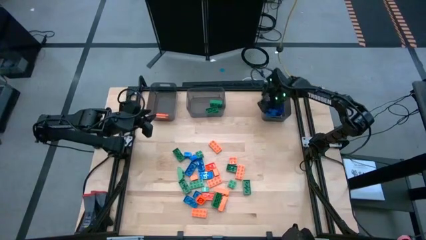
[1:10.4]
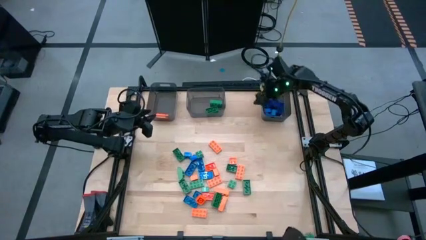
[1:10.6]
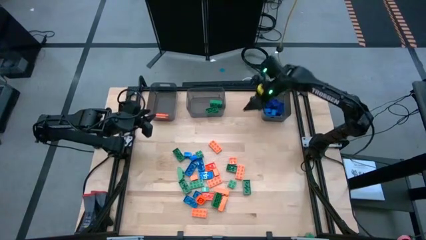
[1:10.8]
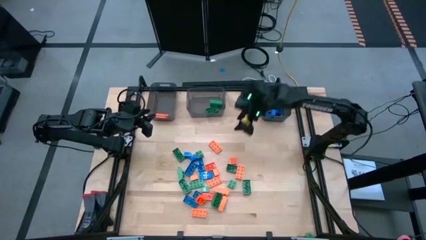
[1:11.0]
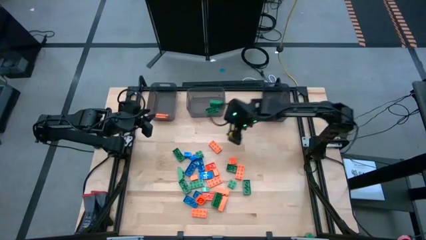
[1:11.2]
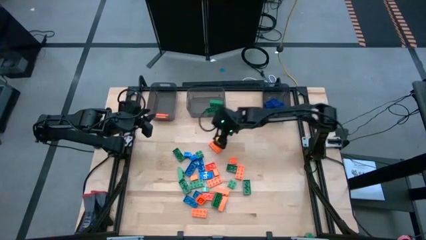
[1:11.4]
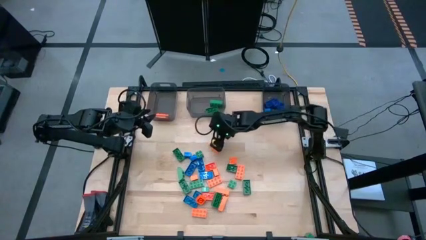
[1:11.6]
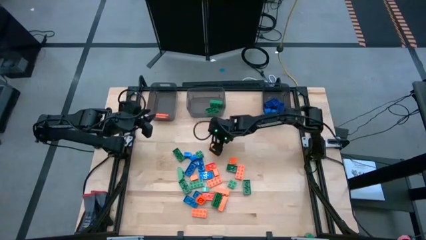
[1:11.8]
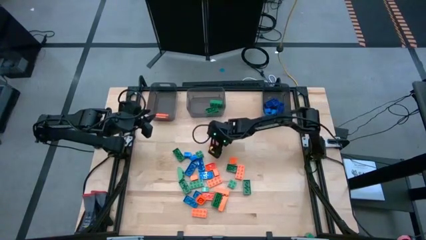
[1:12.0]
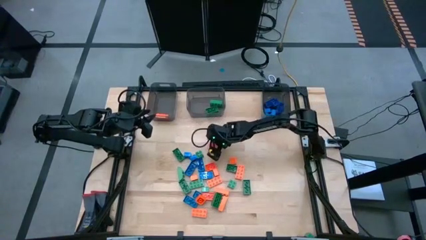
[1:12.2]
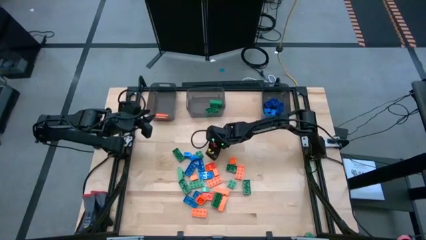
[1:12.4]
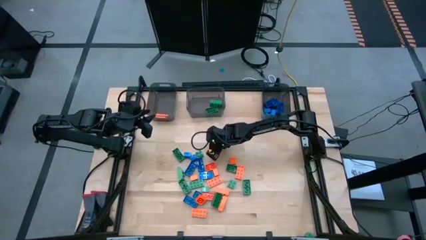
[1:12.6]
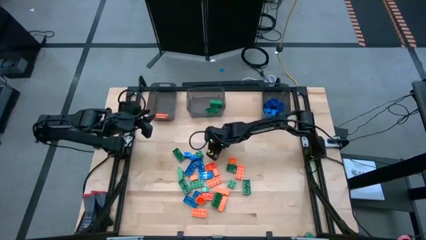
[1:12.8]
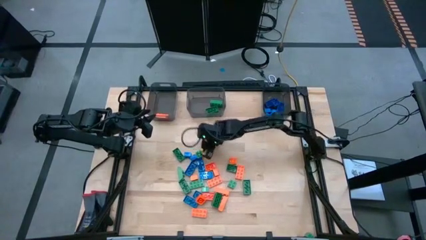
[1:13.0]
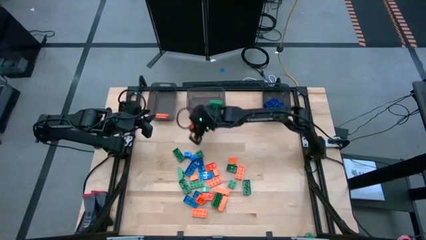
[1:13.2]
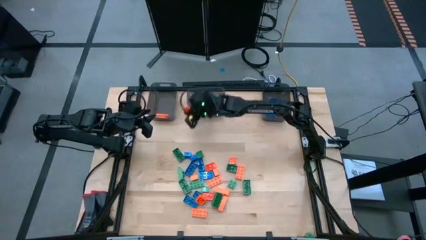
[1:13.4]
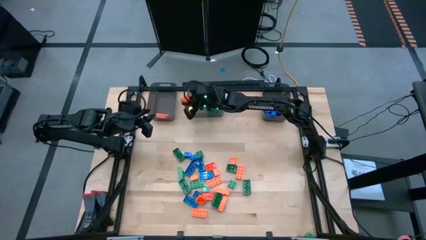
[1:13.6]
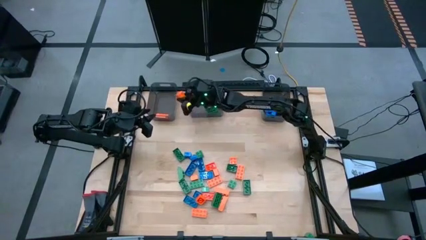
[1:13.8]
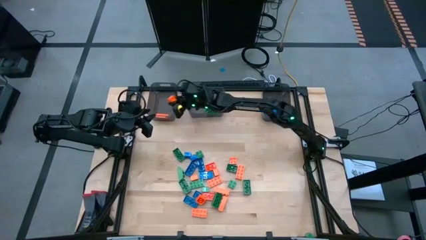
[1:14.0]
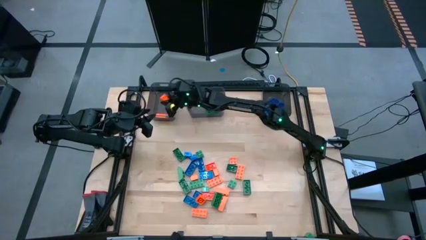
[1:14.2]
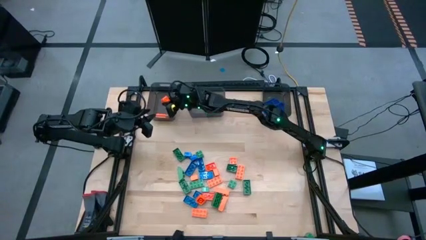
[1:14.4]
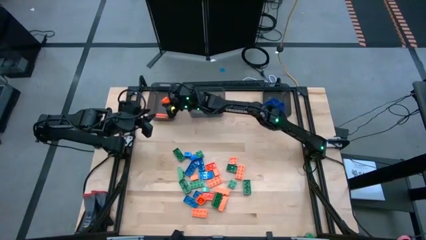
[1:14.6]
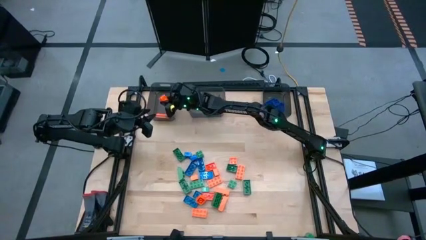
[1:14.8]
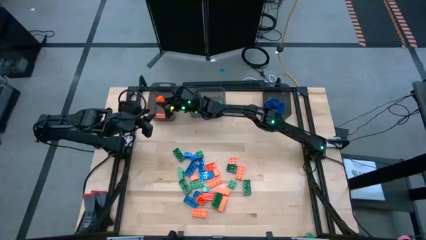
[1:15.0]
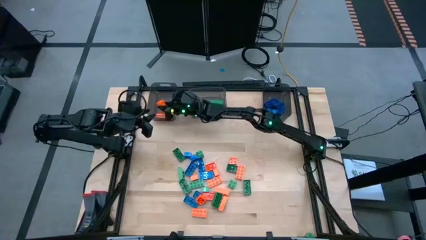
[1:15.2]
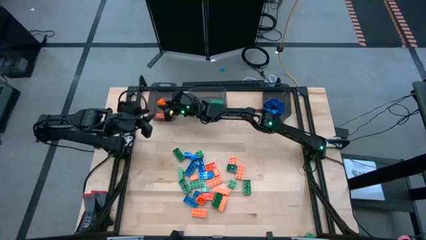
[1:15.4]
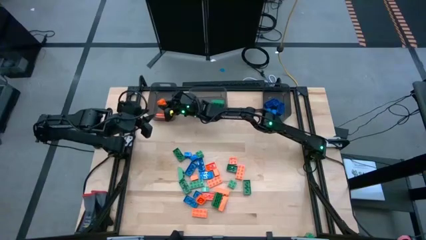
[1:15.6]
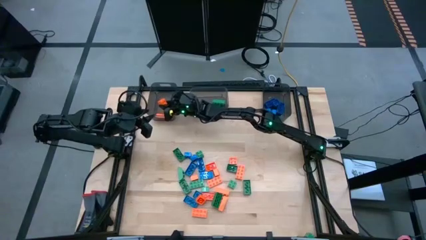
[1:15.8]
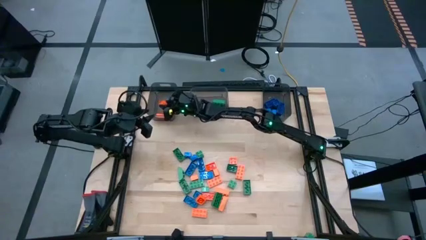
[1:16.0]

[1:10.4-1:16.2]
Task: Sort blocks
Put the orange game piece into the left black bin

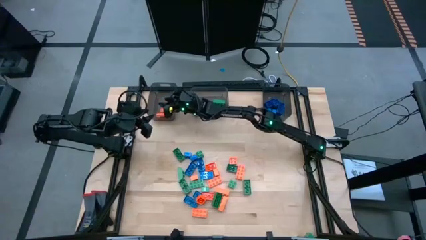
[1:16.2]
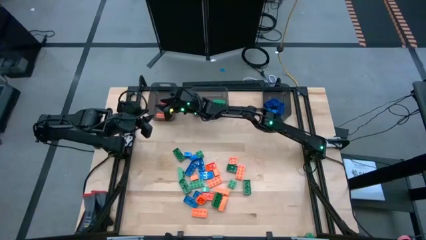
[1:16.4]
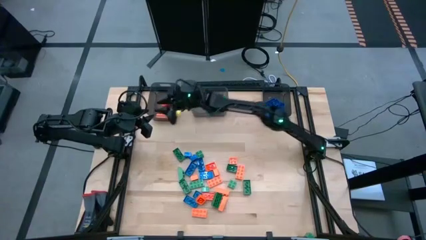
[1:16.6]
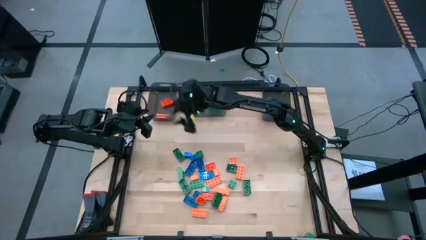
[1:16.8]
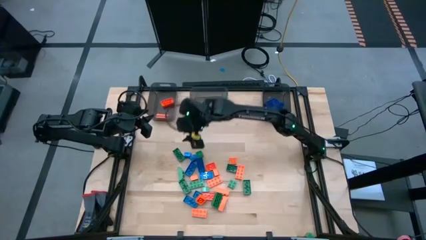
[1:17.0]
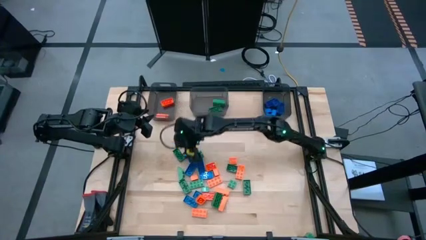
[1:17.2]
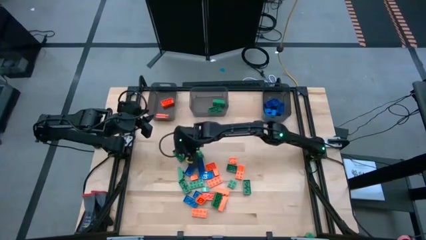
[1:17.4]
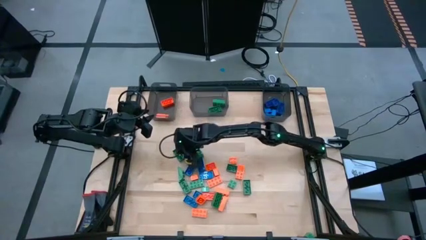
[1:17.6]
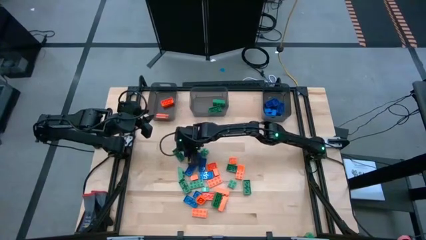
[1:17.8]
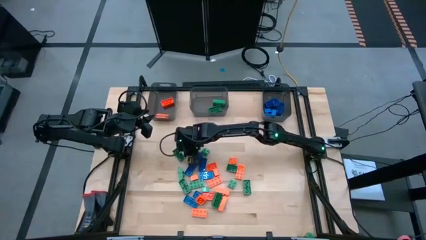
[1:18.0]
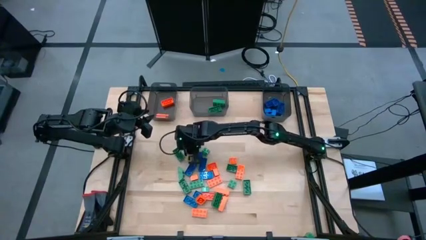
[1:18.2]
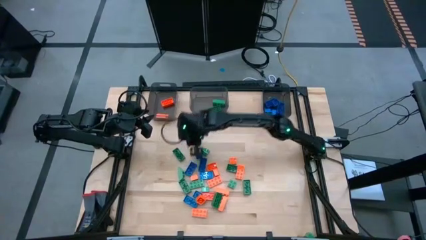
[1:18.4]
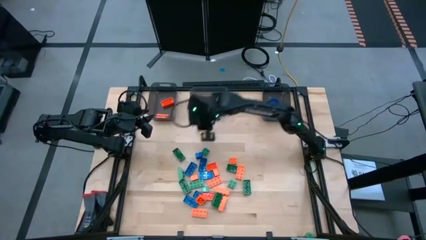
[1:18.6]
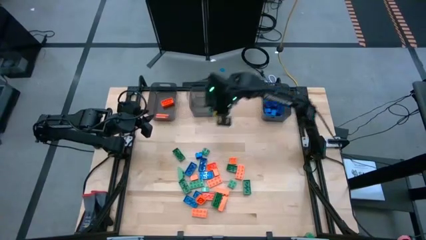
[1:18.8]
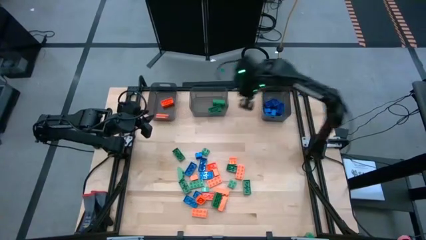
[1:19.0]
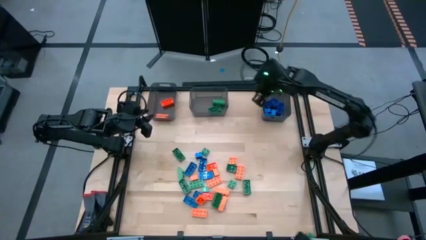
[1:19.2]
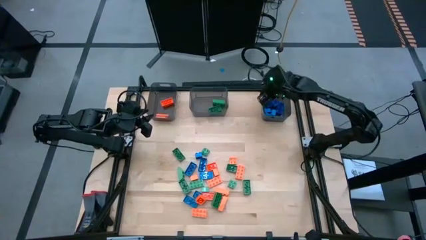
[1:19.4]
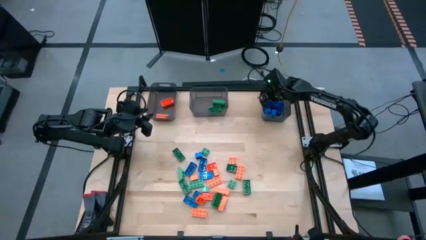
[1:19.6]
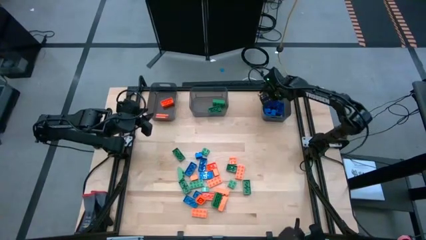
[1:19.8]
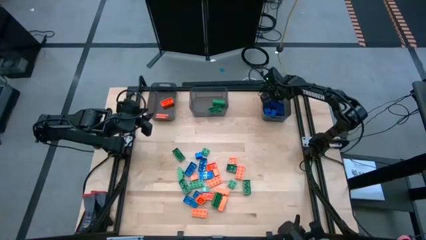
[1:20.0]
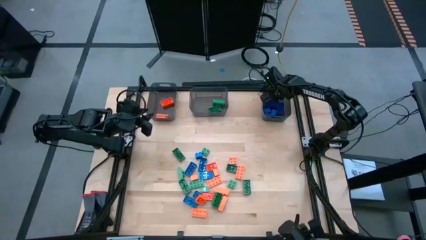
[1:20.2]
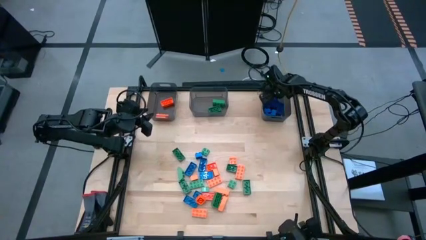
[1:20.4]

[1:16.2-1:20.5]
Put the blue game piece into the right black bin

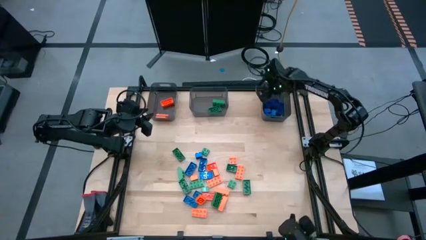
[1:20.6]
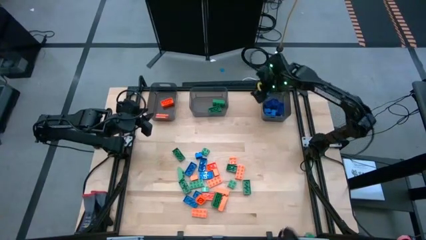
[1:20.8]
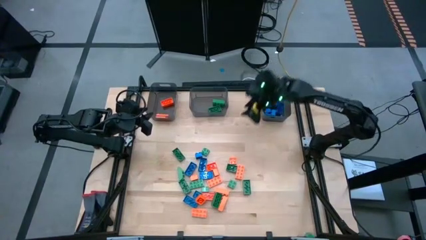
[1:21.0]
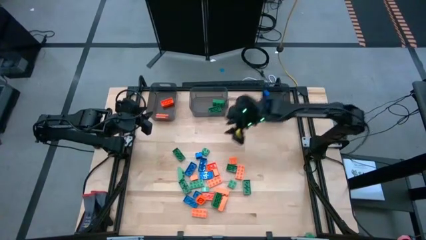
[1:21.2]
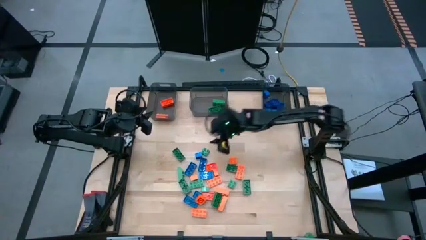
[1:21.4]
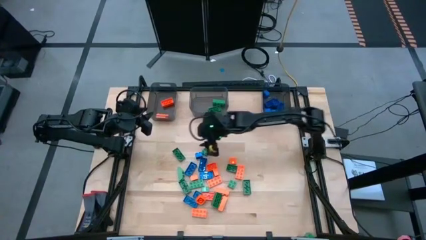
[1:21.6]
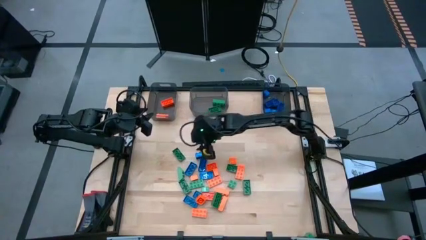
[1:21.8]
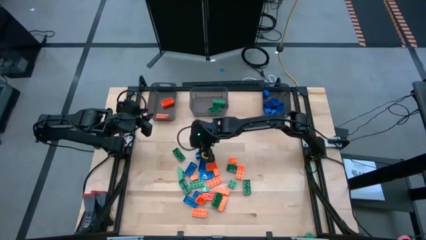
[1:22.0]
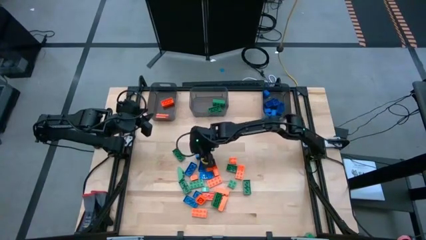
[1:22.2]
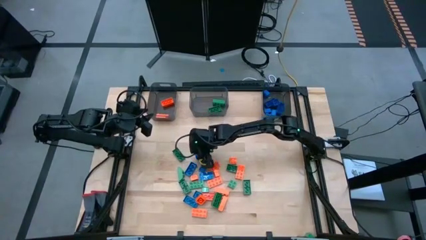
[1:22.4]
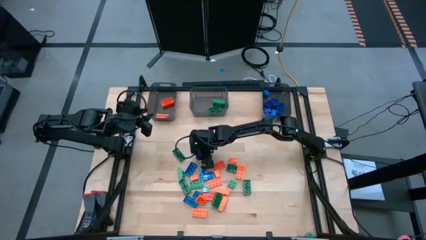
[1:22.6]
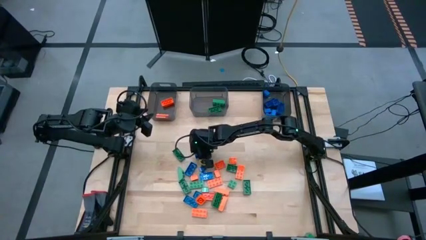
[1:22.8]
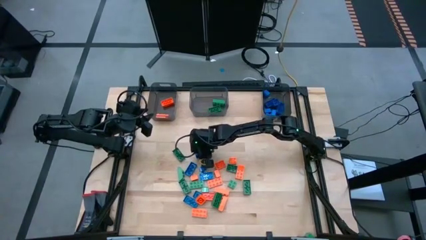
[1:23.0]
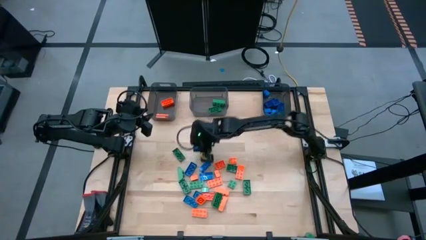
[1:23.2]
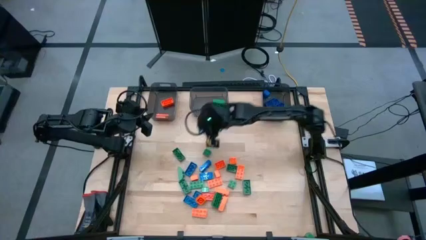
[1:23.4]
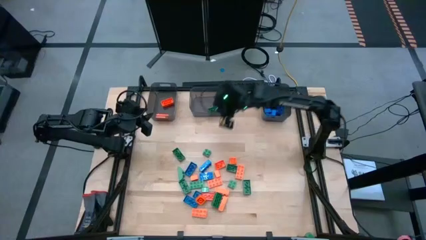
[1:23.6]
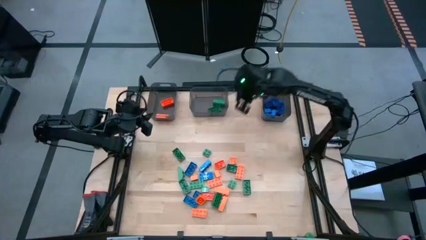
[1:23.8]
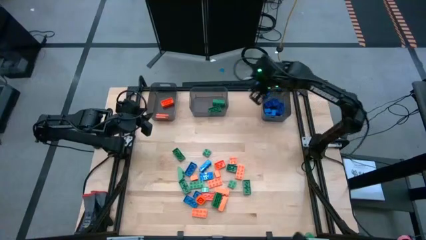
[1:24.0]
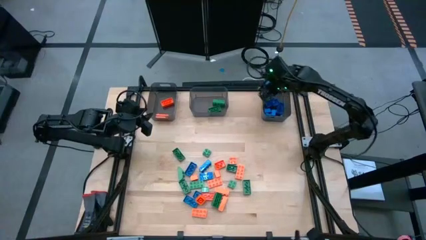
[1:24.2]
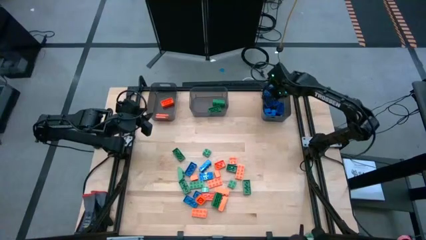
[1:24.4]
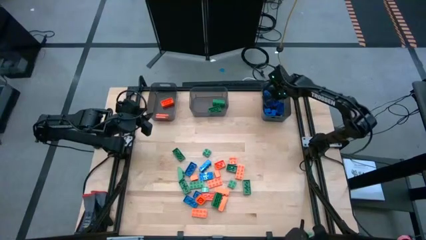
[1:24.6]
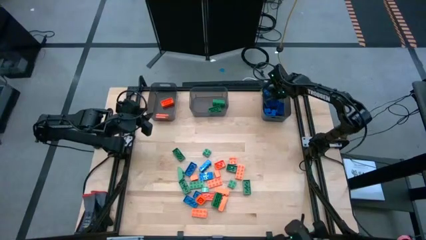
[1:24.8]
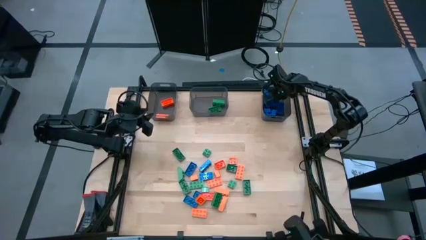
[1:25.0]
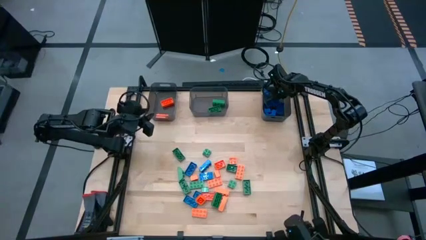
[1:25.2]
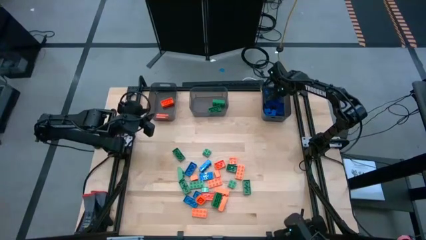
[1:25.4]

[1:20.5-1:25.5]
Put the blue game piece into the right black bin
